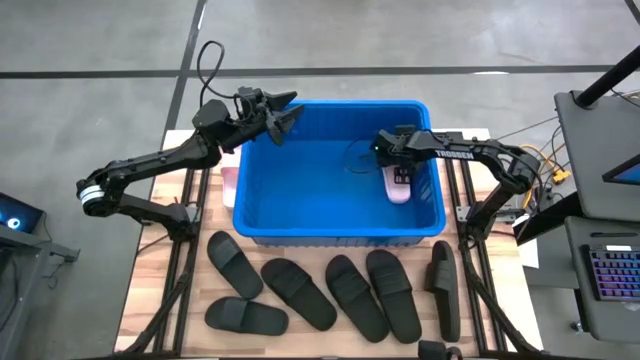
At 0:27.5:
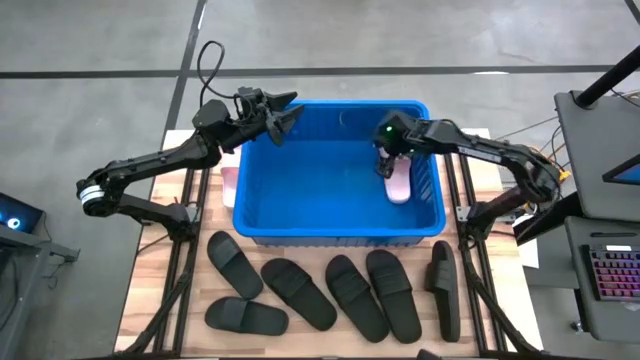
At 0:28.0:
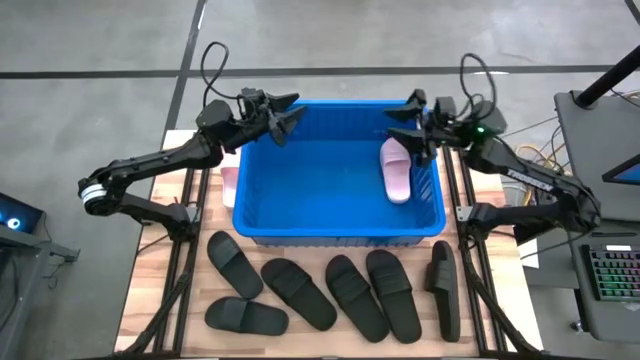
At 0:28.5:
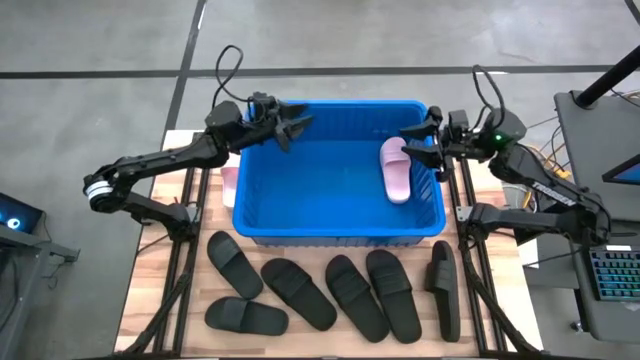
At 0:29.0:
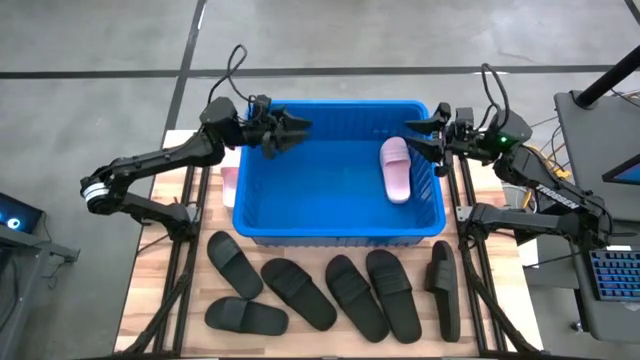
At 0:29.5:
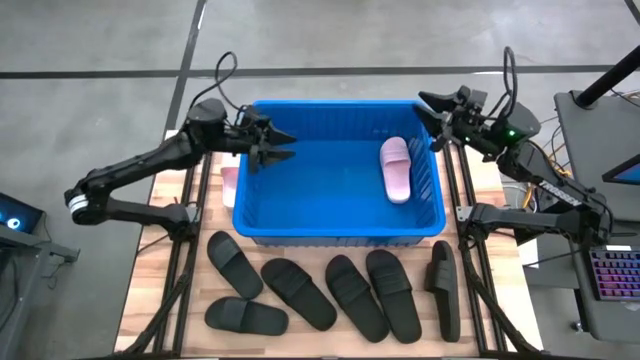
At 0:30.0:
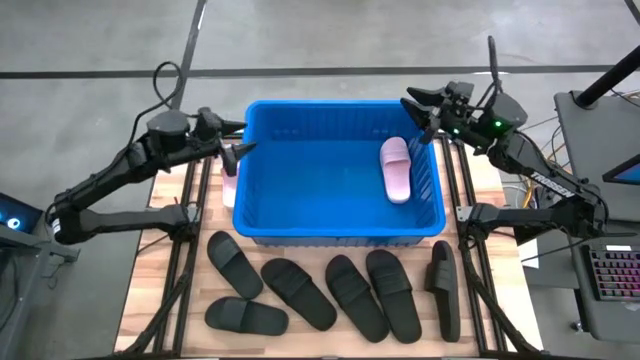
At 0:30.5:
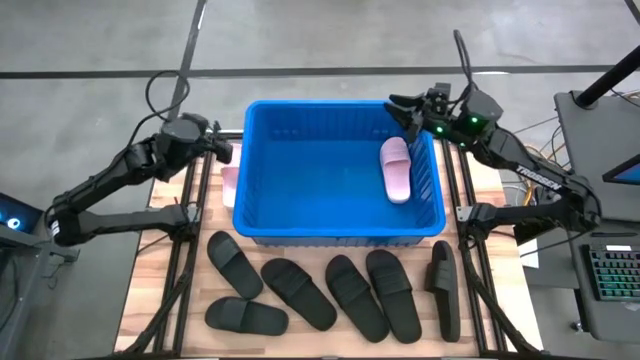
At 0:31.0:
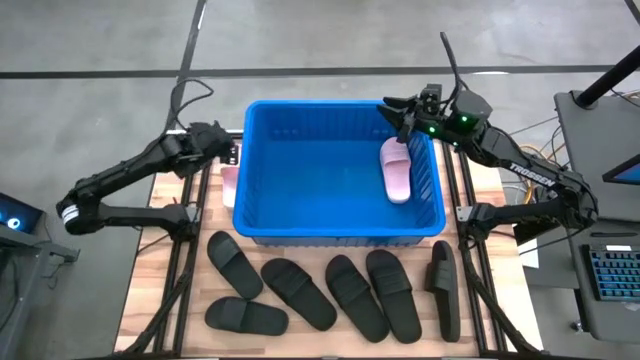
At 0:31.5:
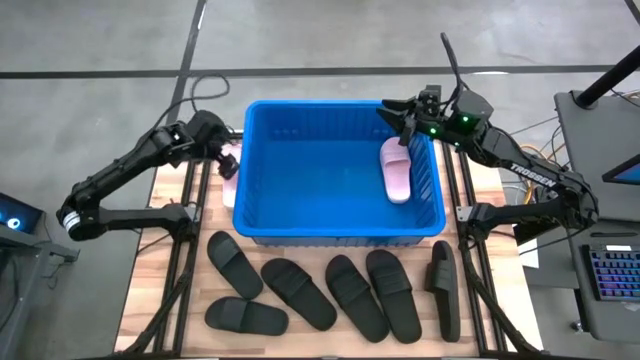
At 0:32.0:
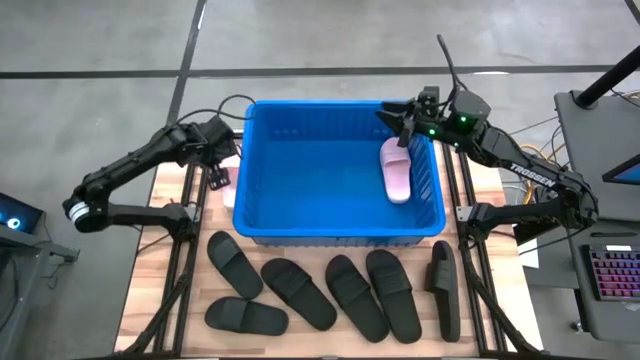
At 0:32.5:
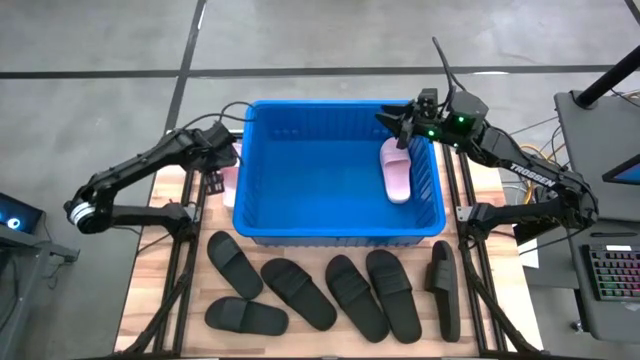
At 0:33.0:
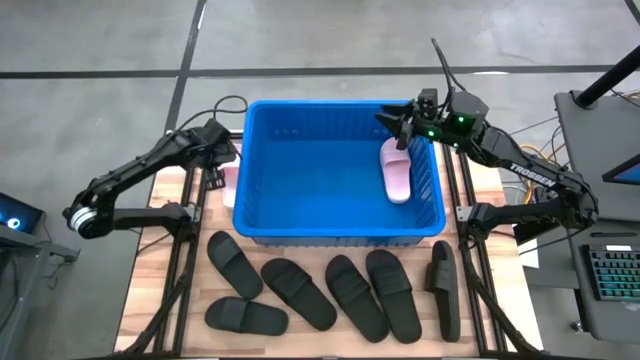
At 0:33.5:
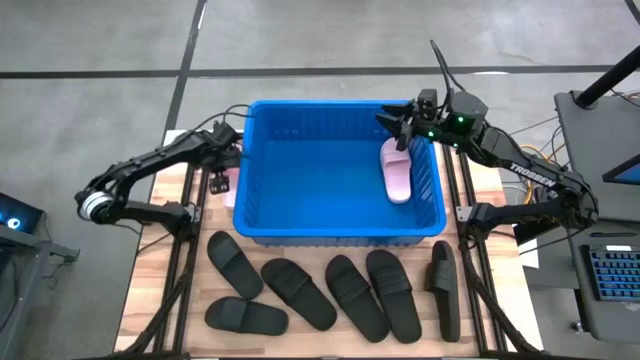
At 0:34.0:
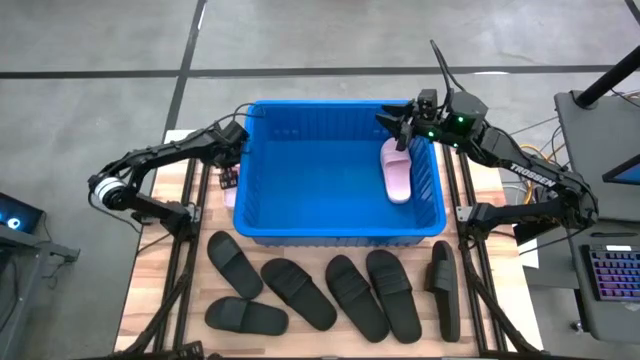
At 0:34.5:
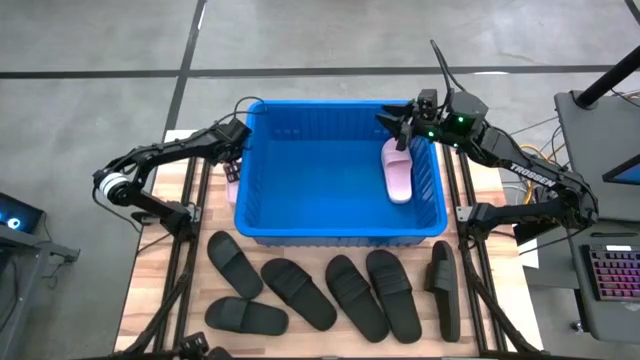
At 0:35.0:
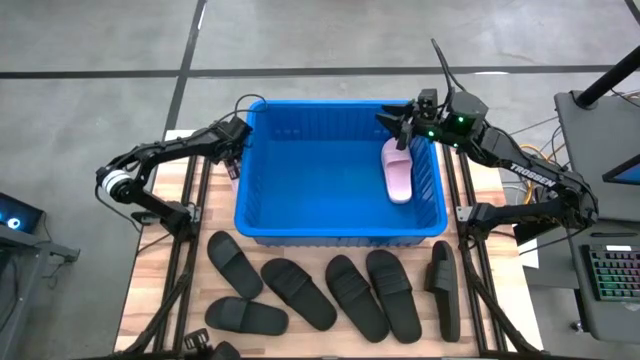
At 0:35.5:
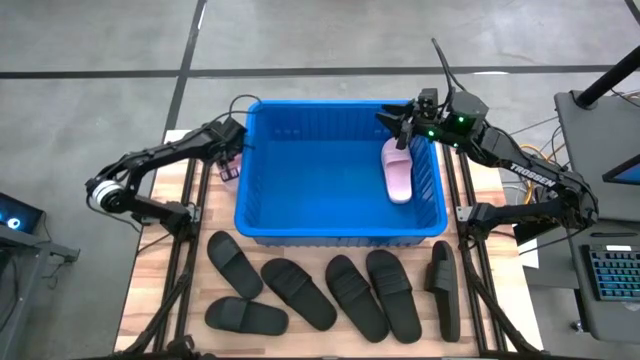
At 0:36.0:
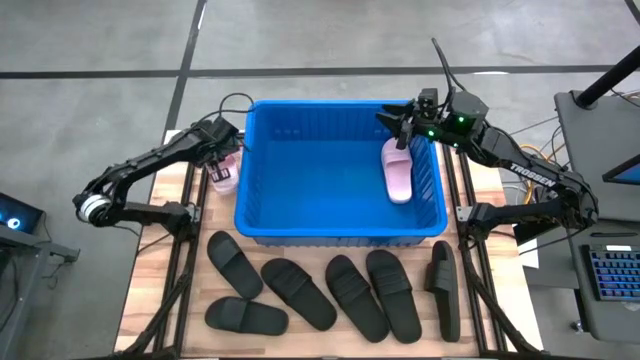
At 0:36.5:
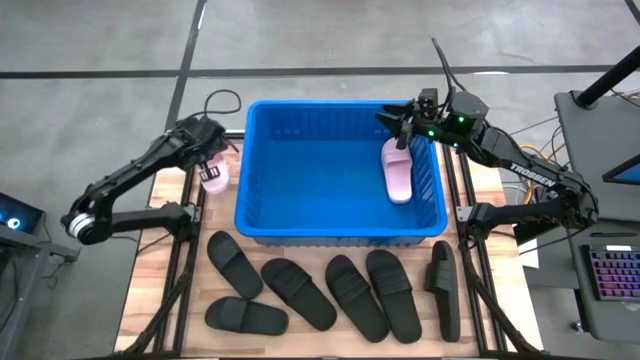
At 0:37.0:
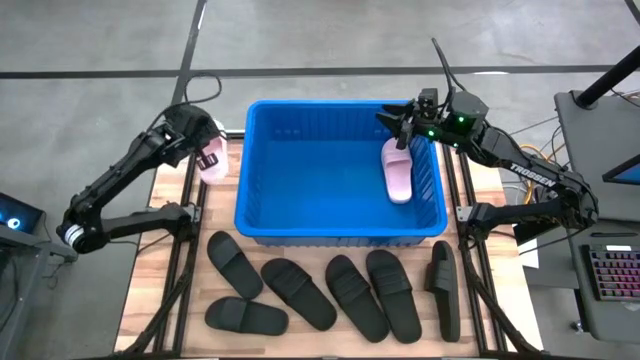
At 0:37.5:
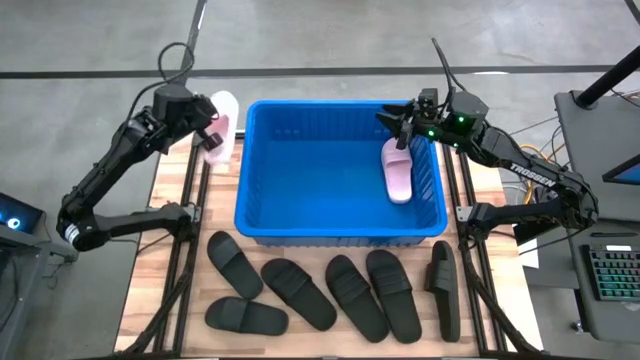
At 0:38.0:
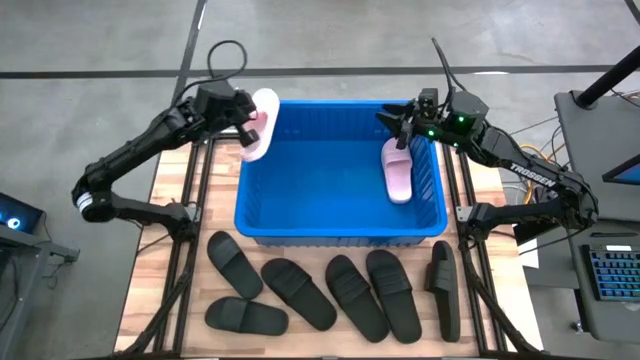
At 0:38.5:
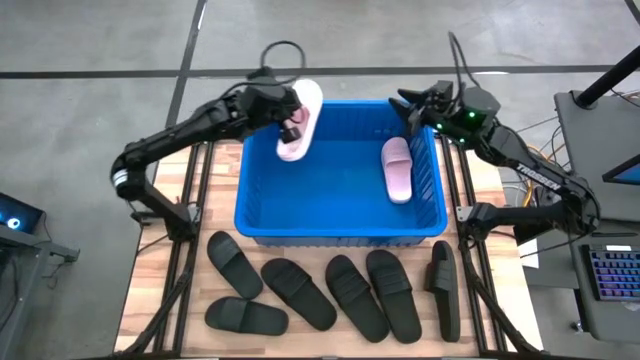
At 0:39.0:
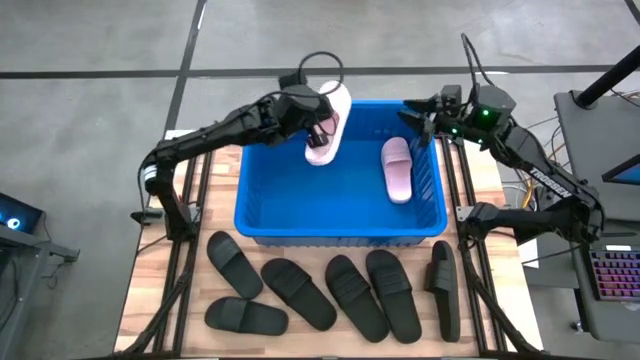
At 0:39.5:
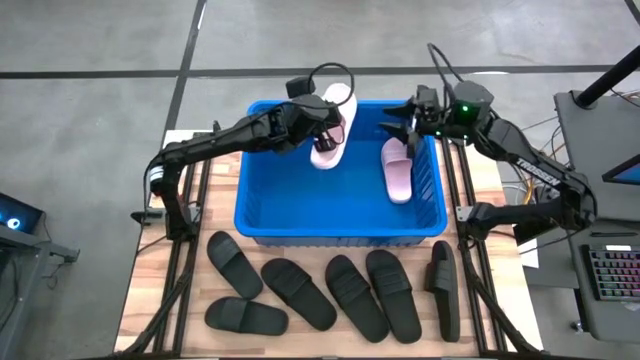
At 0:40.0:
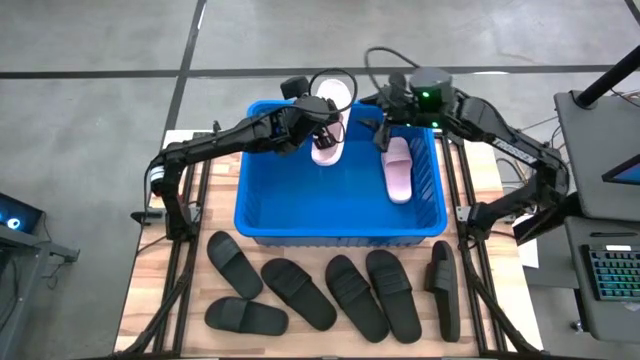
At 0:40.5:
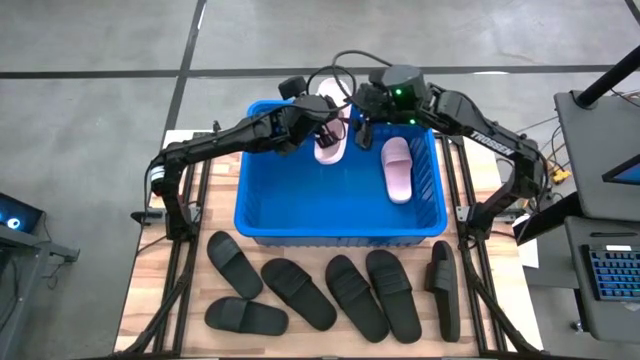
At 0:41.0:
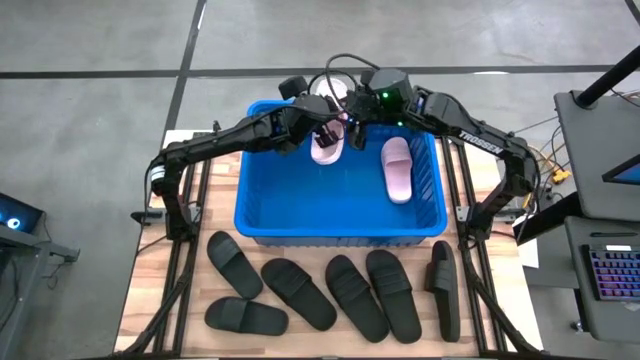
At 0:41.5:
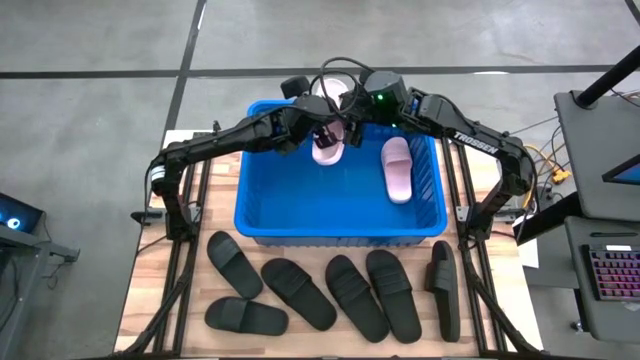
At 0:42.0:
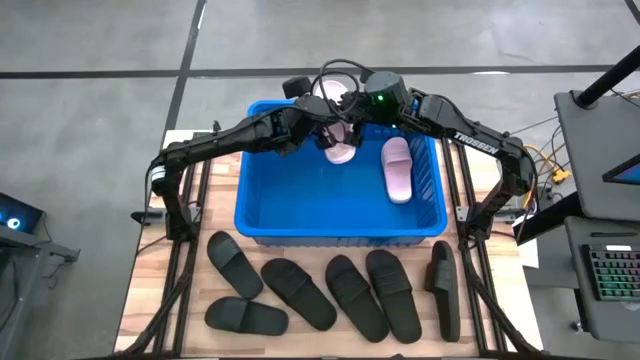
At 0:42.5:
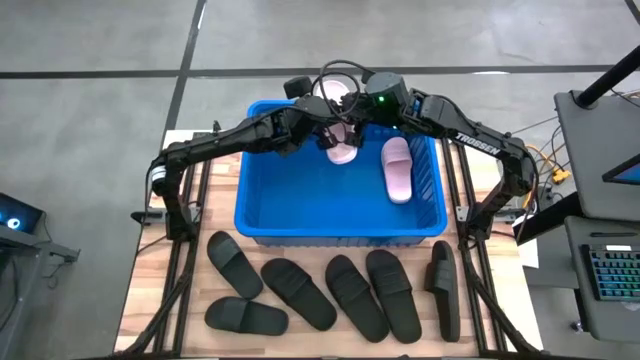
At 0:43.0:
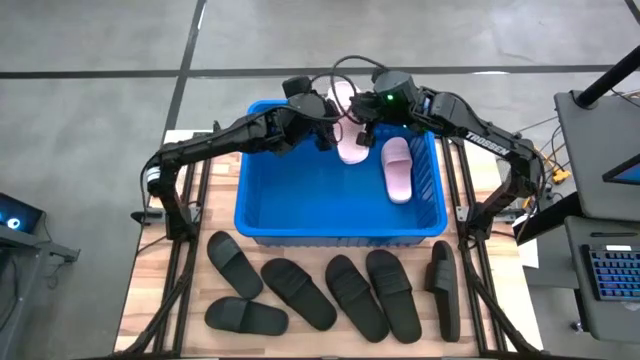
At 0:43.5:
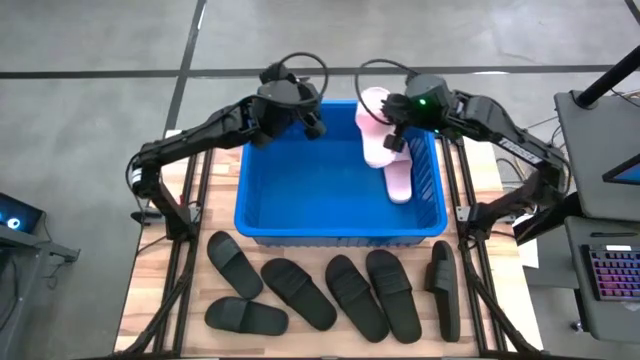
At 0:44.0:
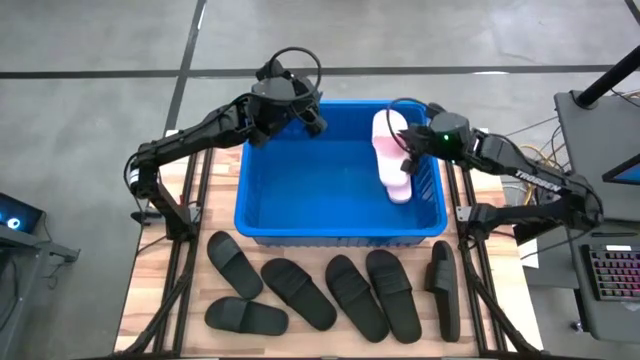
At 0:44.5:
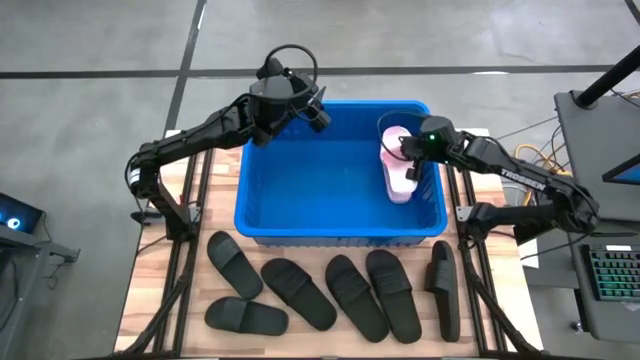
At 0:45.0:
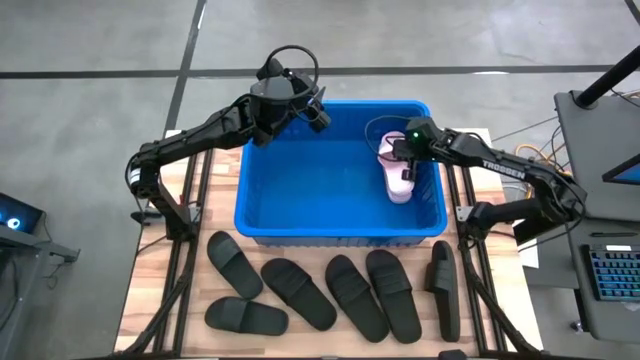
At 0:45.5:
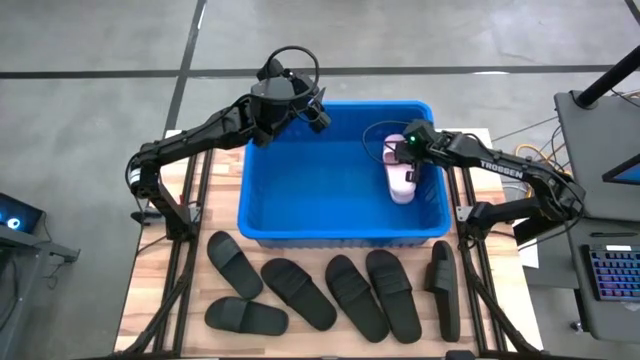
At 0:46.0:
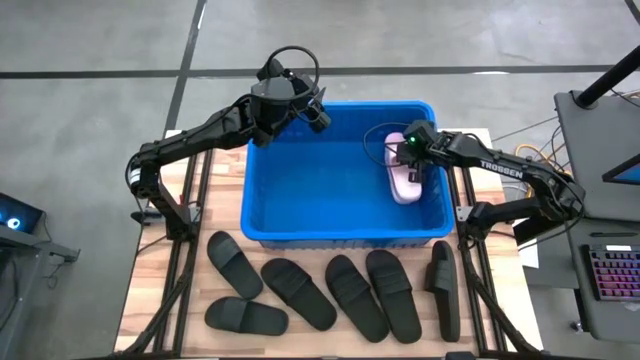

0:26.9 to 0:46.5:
Task: Pick and place slides into bin
Put the pink slide into the blue bin

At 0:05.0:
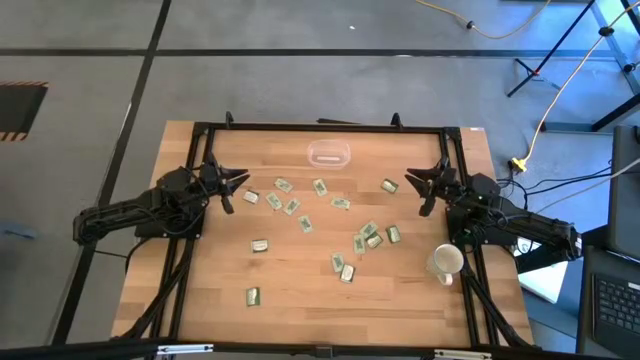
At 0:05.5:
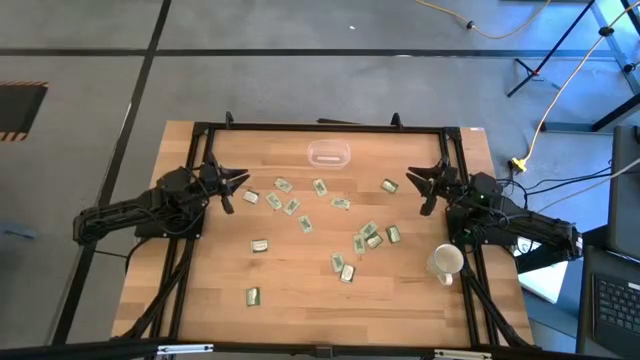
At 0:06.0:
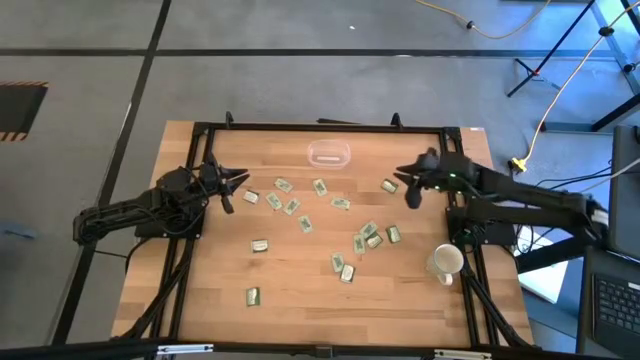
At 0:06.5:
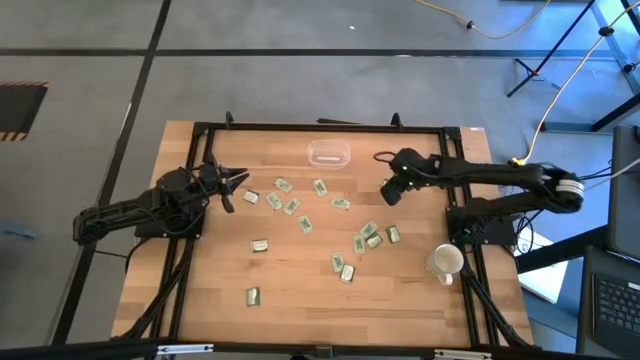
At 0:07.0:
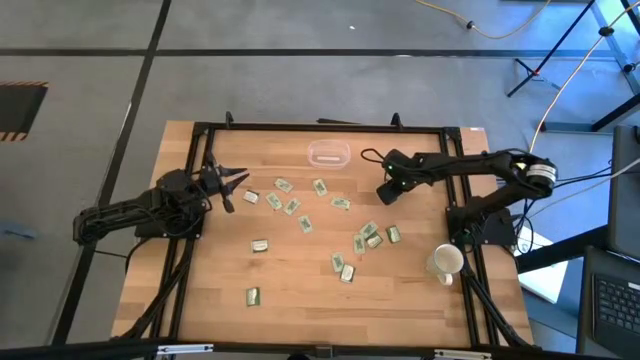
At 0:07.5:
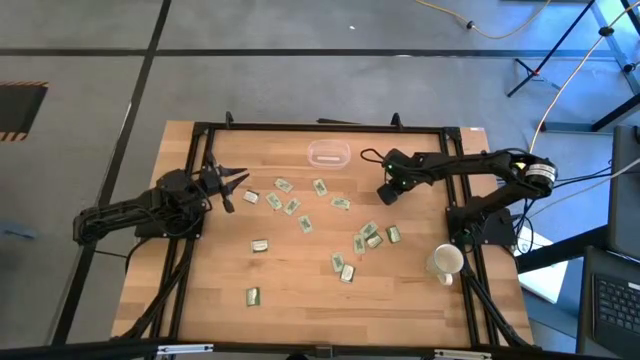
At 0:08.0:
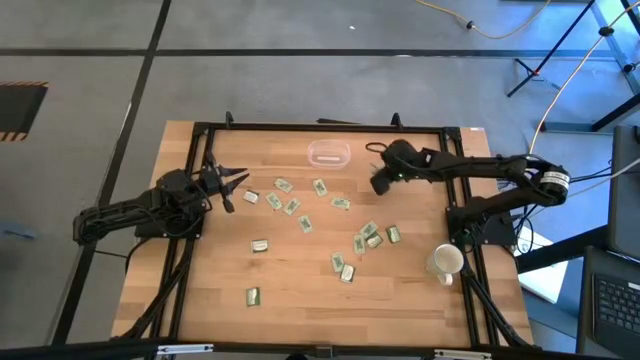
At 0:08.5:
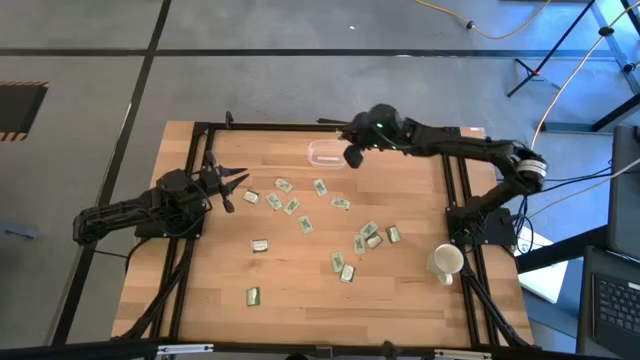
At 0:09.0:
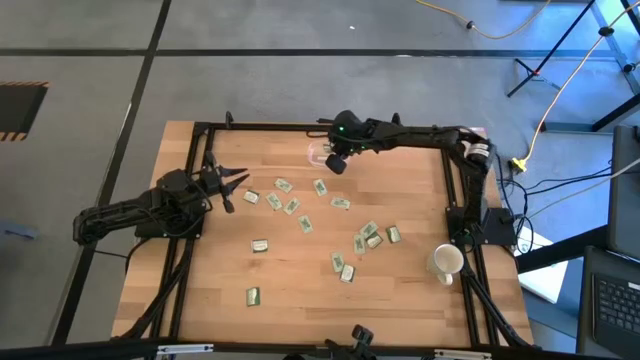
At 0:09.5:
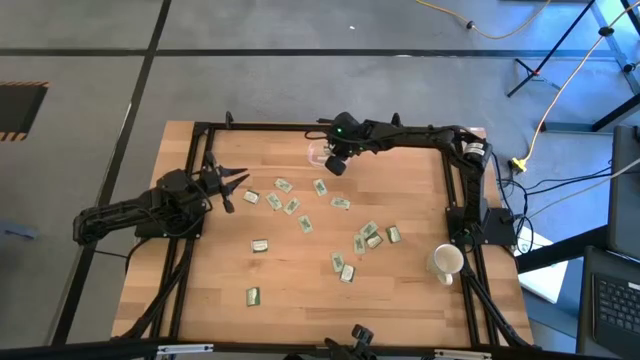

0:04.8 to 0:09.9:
Task: Pick and place items into bin
Put the green stevia packet into the transparent bin
